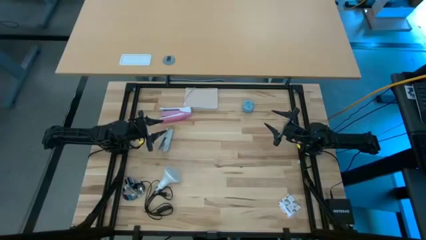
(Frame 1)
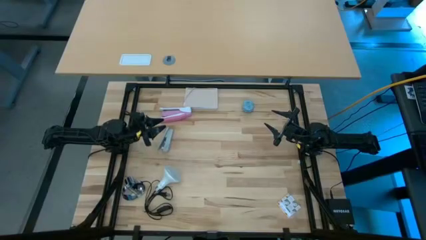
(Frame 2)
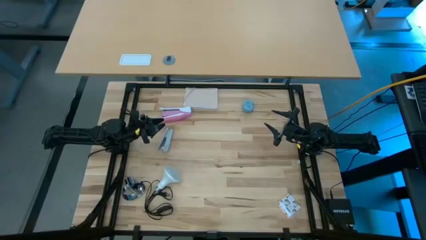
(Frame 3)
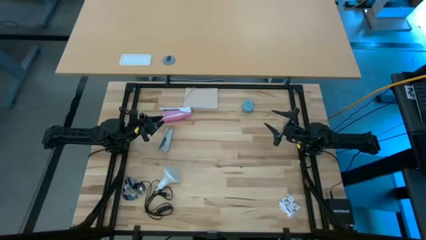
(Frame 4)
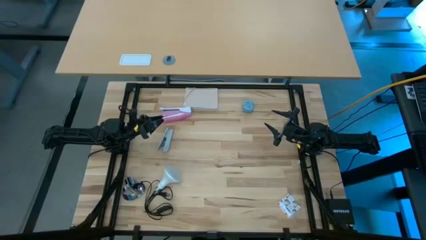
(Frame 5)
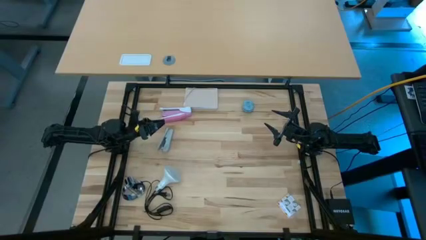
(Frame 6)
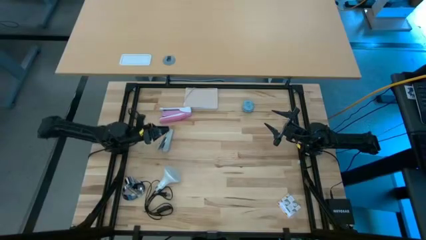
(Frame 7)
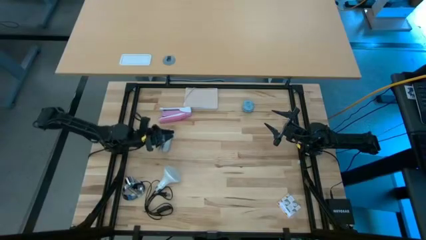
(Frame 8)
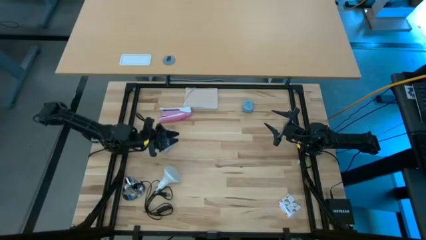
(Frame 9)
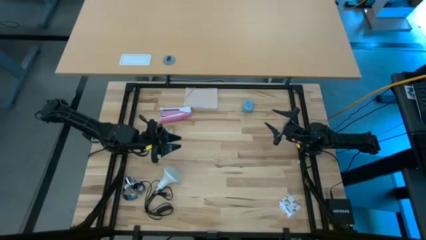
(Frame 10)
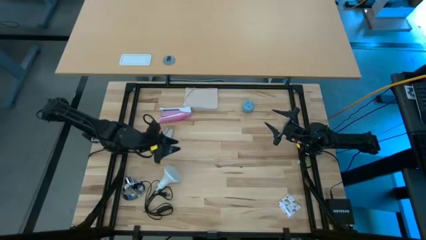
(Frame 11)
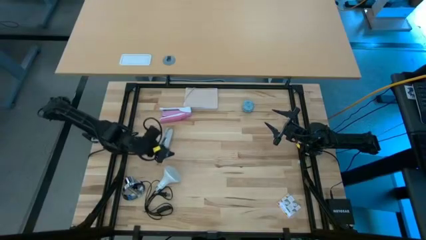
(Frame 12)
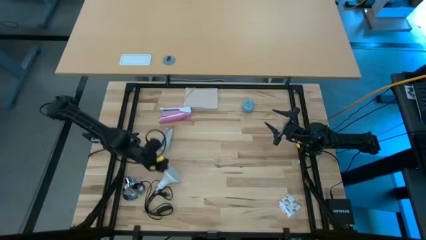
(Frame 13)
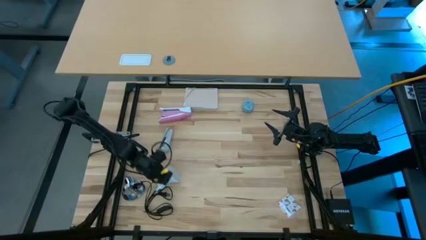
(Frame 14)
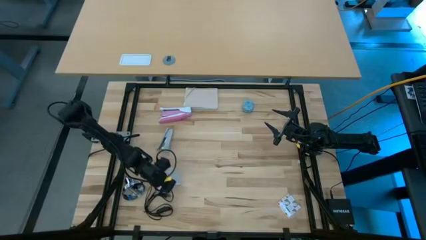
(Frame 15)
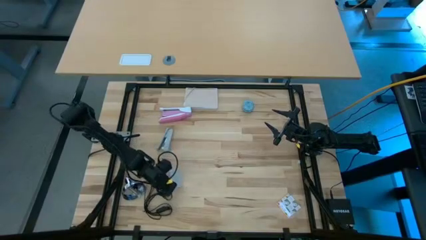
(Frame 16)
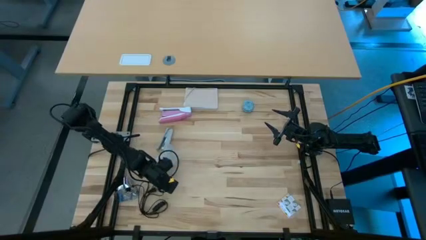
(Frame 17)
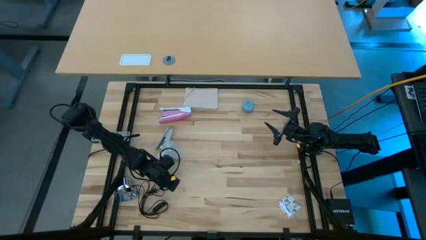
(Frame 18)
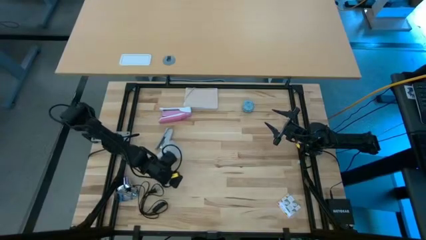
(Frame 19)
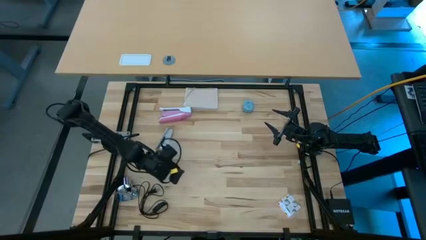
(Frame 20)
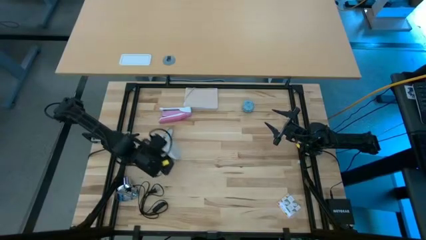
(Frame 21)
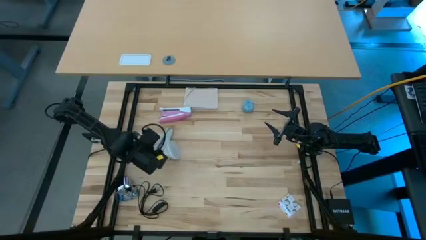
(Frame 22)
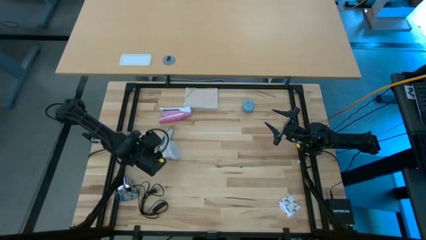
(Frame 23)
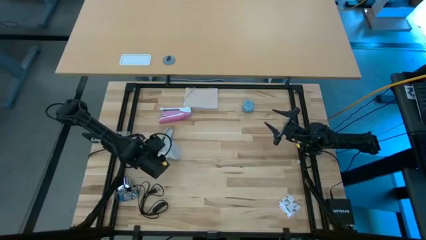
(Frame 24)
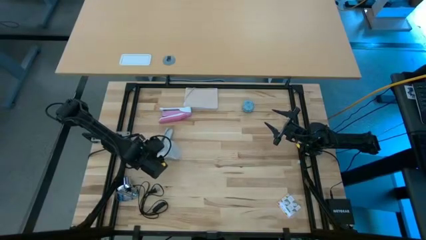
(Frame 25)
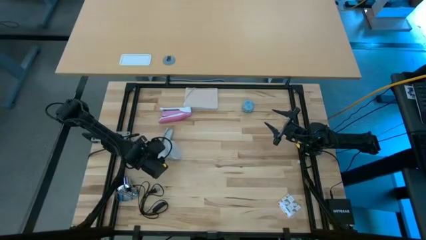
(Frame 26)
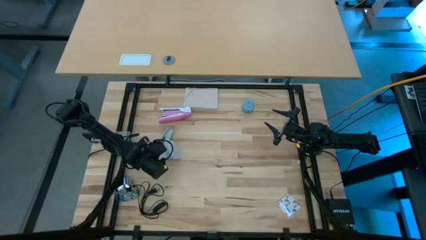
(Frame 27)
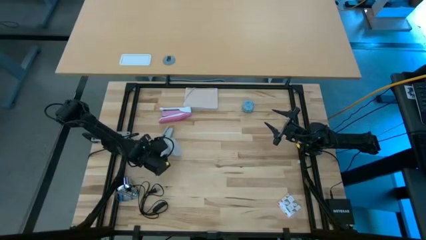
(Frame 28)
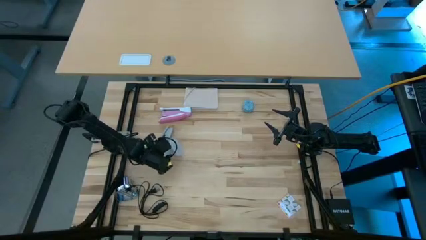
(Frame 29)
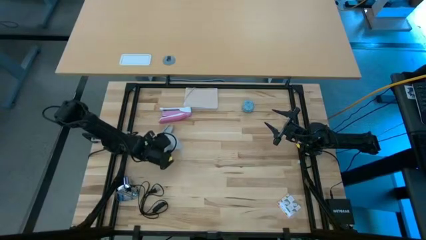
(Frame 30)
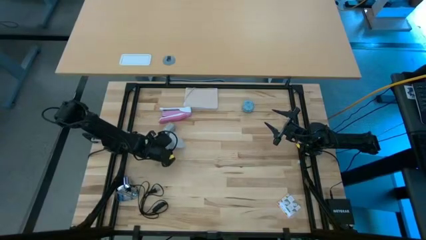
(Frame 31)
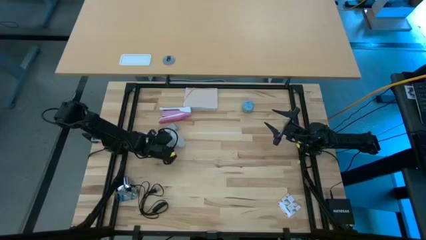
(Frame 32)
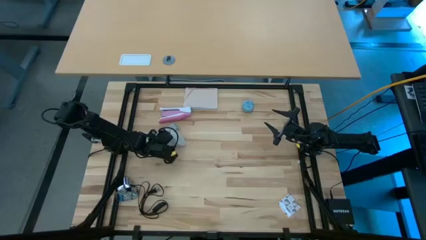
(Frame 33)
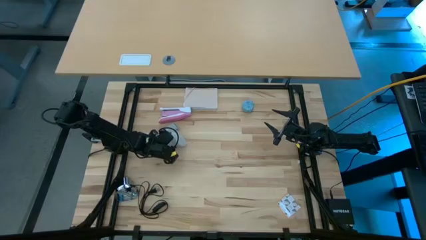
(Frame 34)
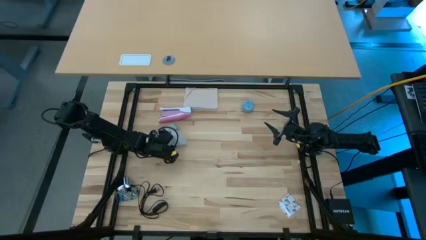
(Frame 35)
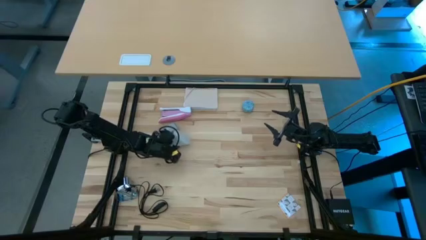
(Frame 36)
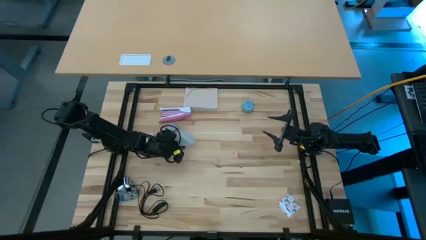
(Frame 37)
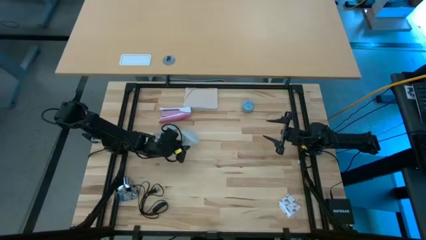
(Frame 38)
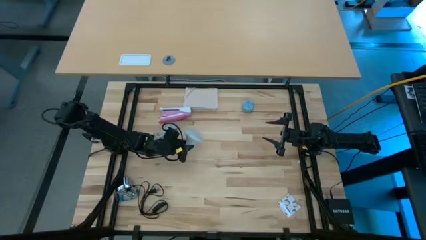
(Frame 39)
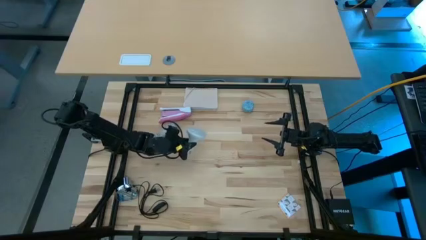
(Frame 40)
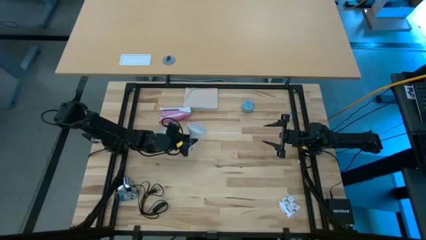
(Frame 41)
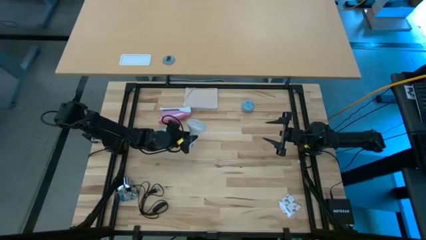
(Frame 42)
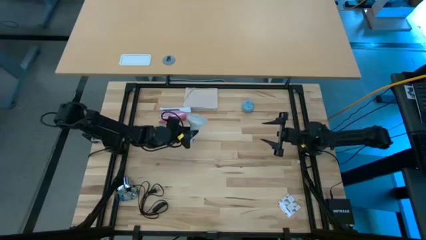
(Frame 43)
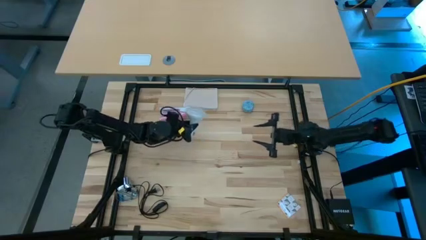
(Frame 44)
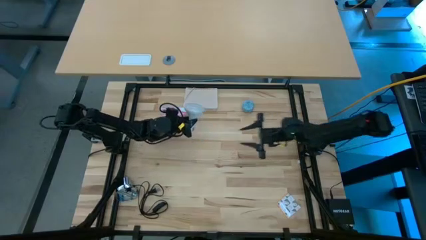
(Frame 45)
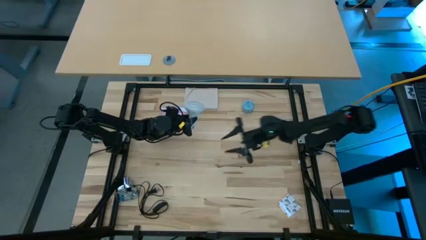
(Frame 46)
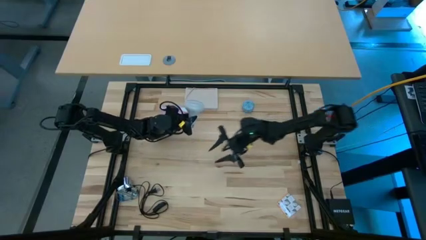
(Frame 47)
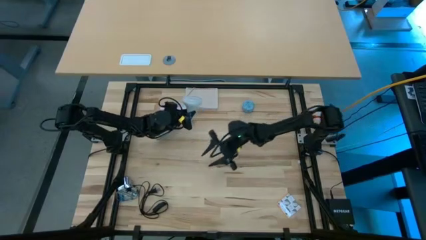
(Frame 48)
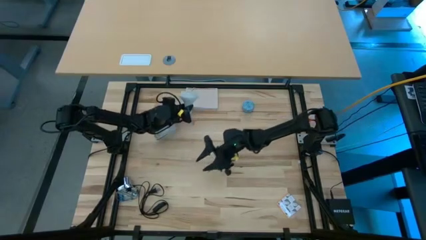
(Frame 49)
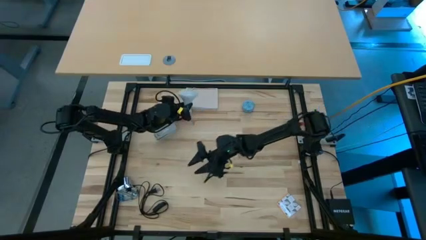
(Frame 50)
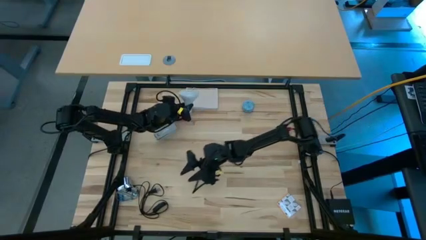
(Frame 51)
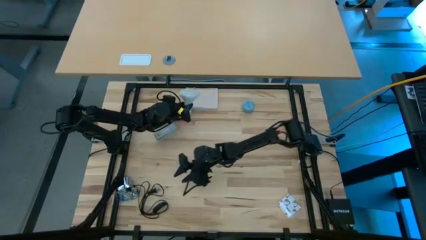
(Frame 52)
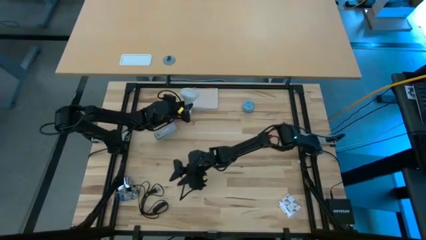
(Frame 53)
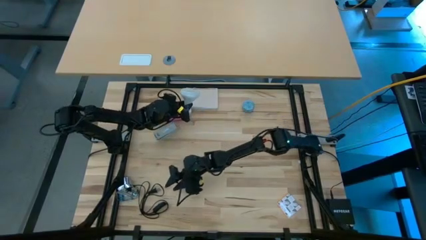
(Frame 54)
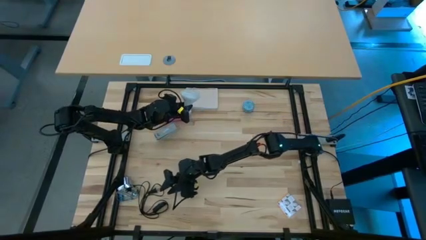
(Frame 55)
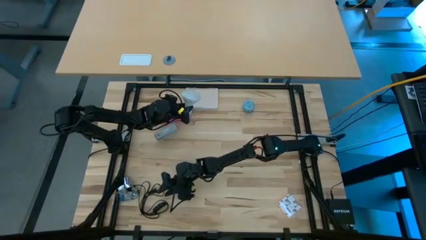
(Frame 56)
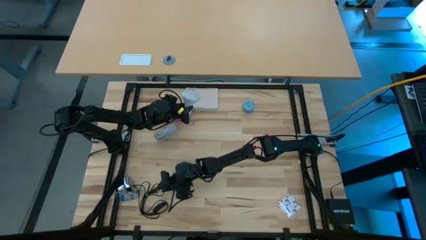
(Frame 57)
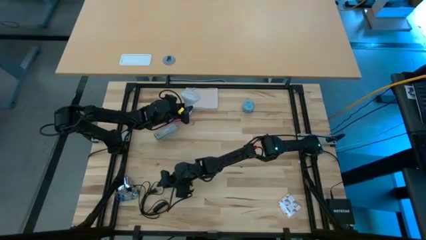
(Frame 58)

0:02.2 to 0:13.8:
Task: Screw lightbulb
Insert the white lightbulb into the desk lamp
